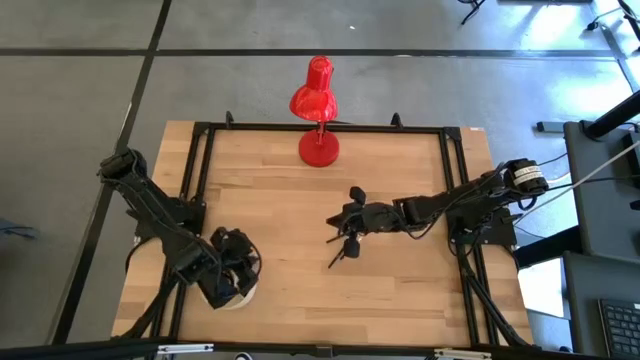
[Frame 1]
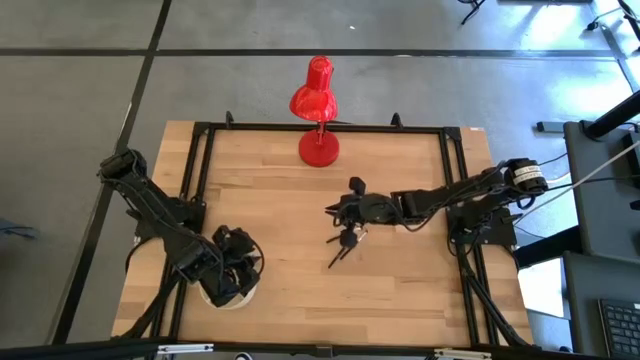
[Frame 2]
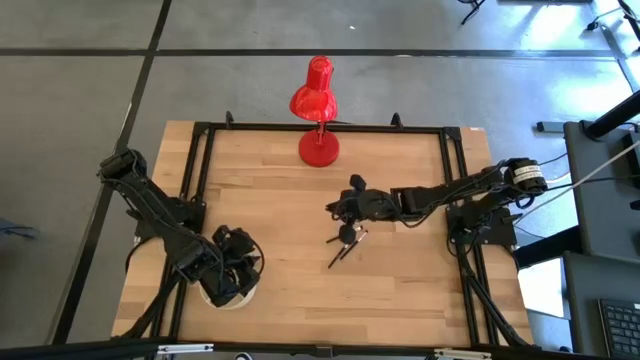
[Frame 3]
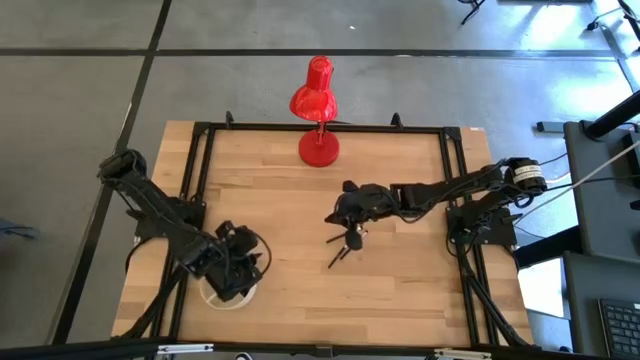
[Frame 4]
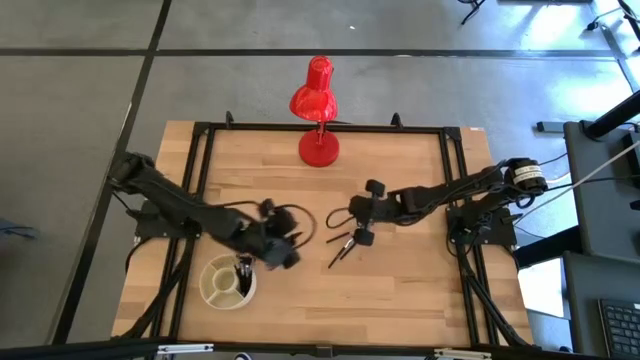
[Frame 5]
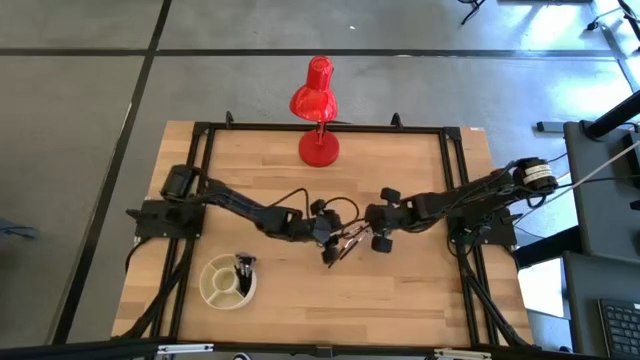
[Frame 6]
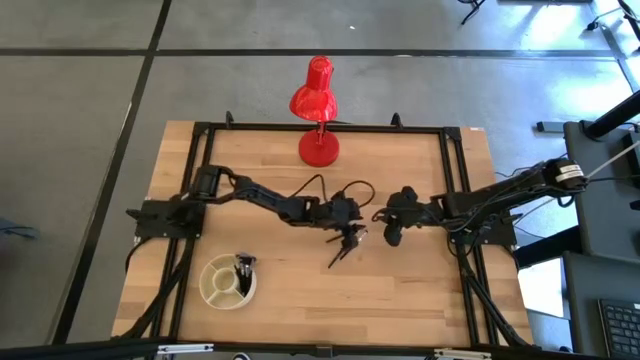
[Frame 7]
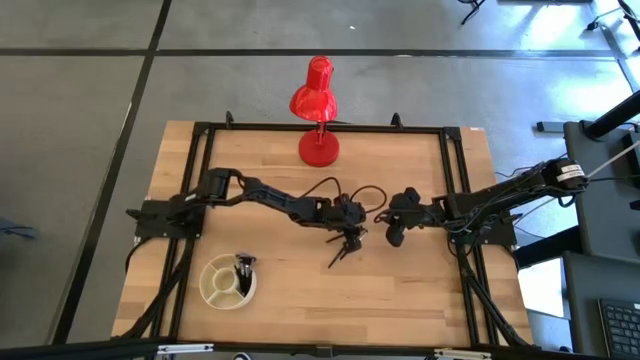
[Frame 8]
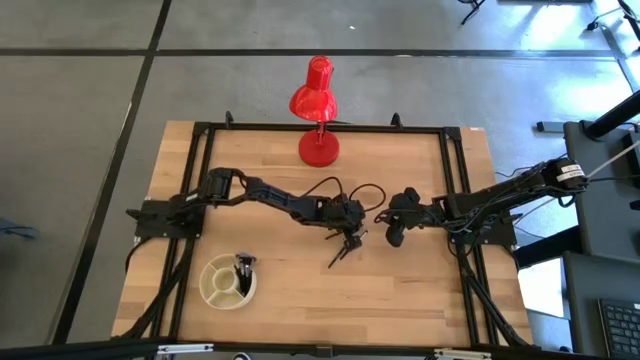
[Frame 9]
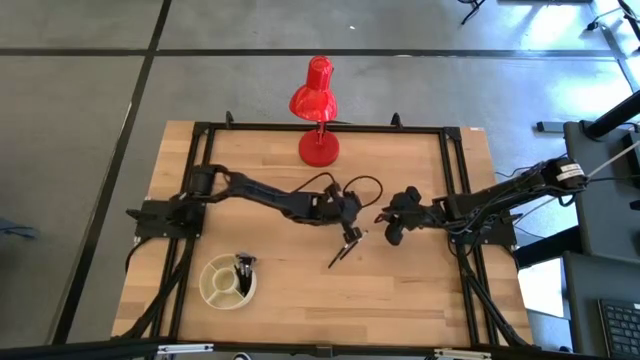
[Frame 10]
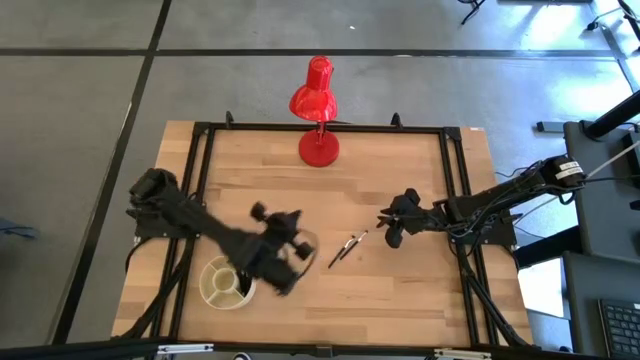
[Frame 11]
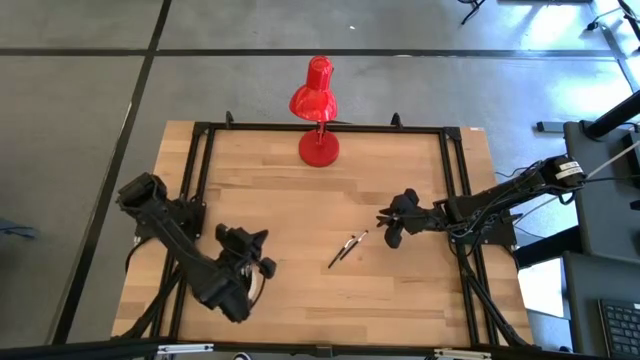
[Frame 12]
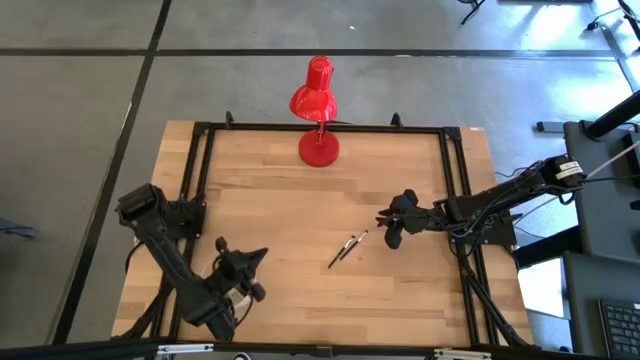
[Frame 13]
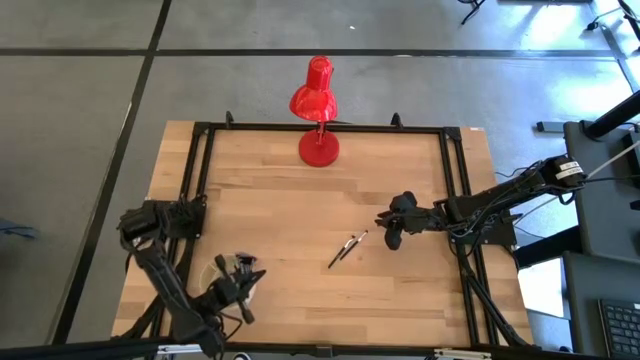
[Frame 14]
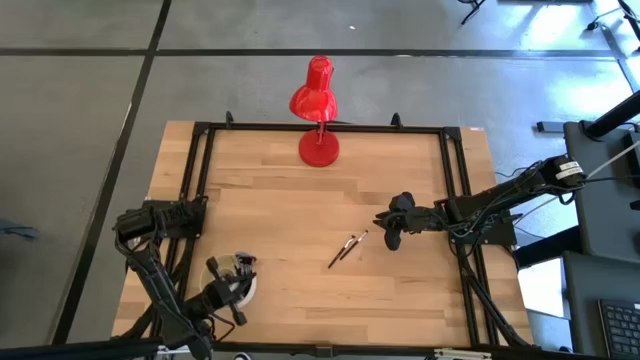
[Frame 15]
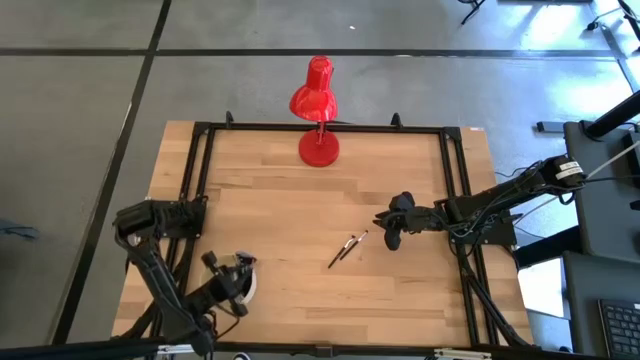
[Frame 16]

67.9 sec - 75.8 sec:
Task: Put items in baskets/containers
Put the eyeshadow brush into the pen organizer

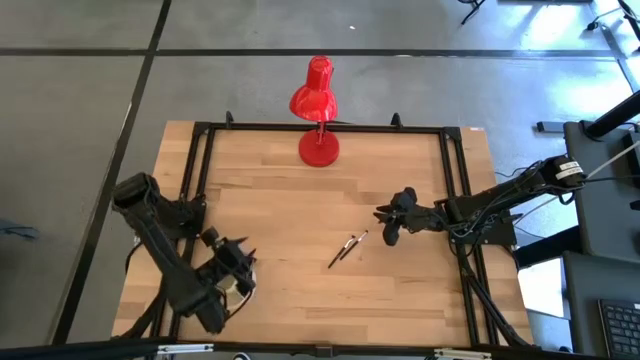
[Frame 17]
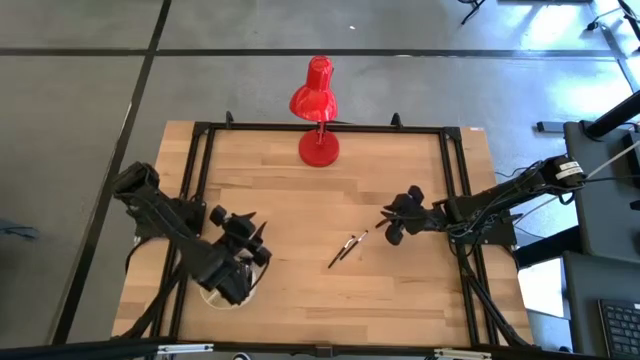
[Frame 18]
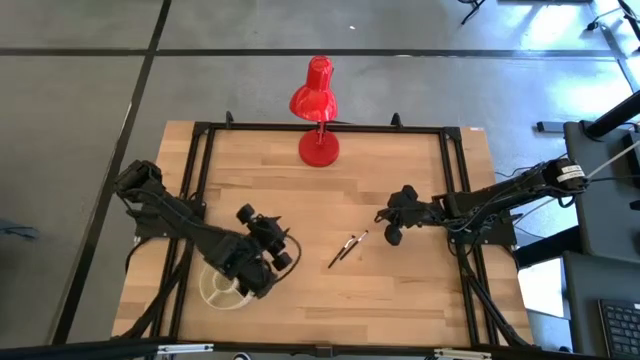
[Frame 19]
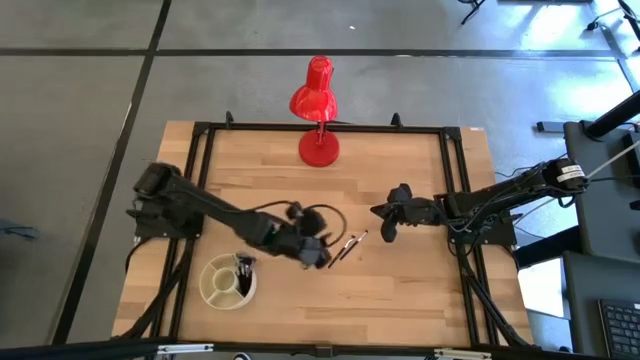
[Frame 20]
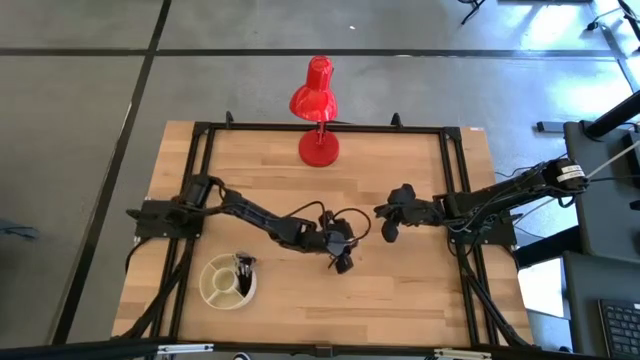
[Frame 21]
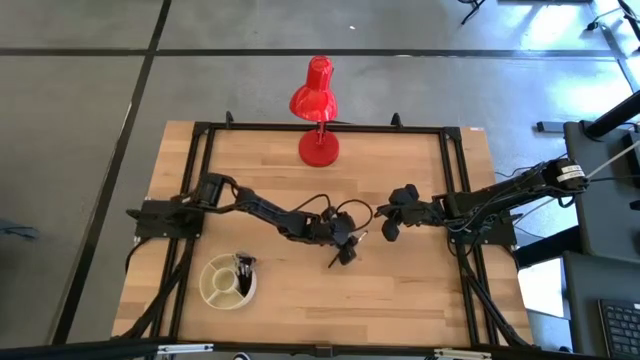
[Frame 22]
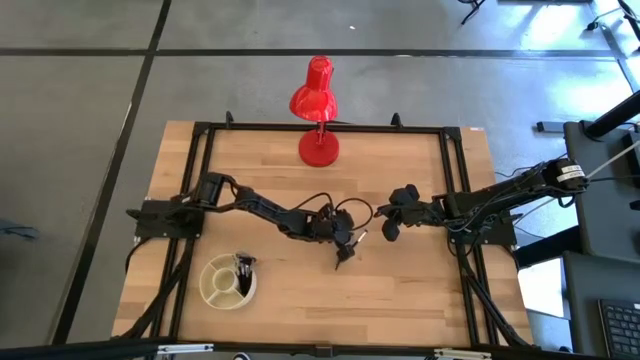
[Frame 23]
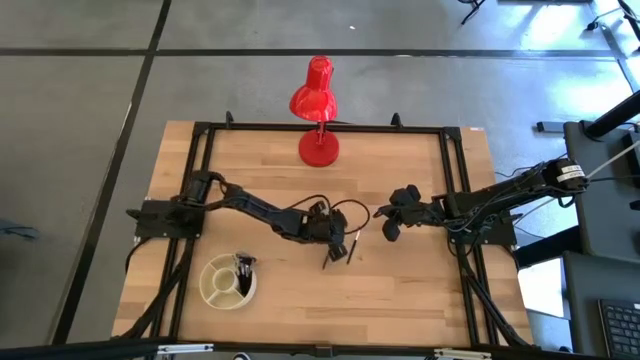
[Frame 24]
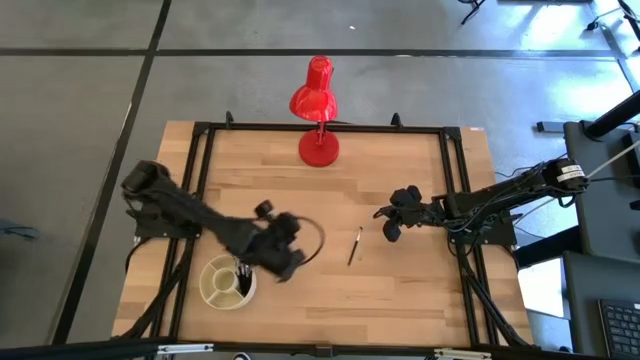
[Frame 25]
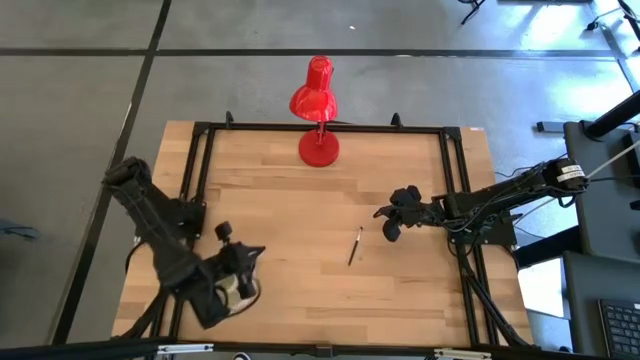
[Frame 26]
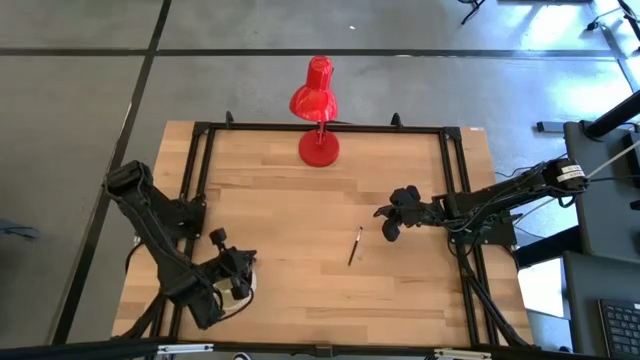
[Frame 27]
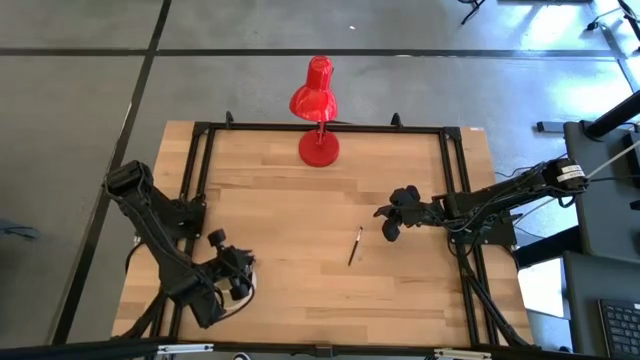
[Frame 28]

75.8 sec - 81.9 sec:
Put the eyeshadow brush into the pen organizer

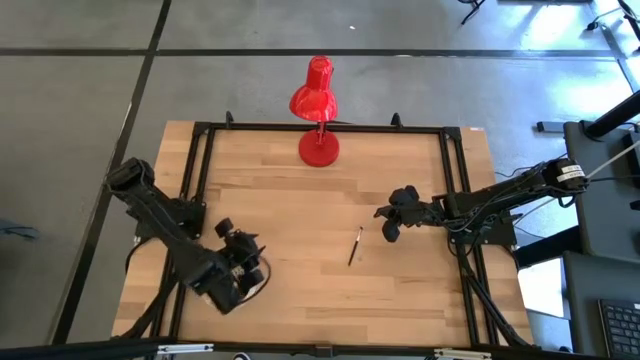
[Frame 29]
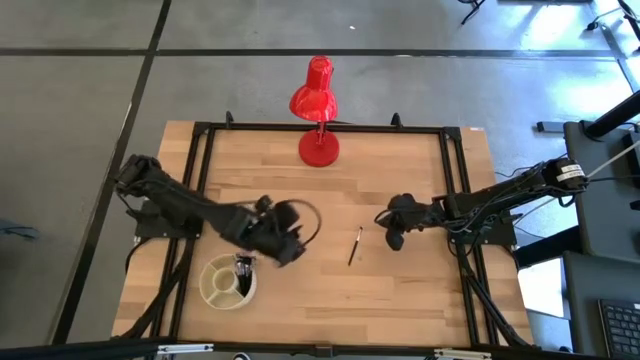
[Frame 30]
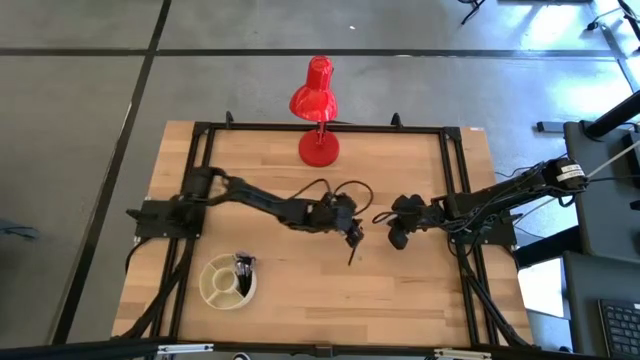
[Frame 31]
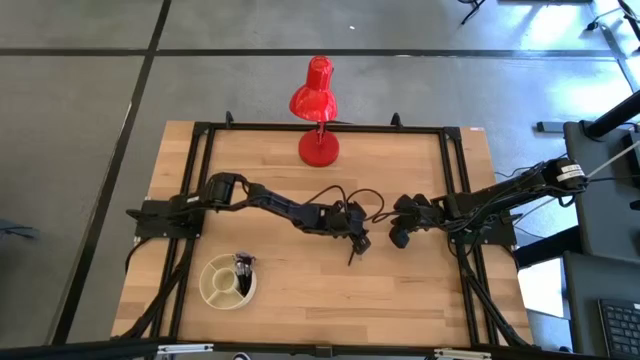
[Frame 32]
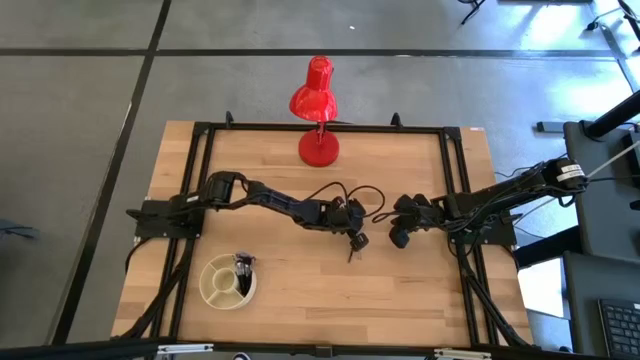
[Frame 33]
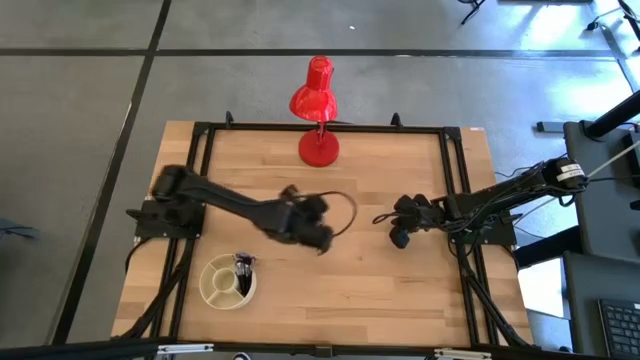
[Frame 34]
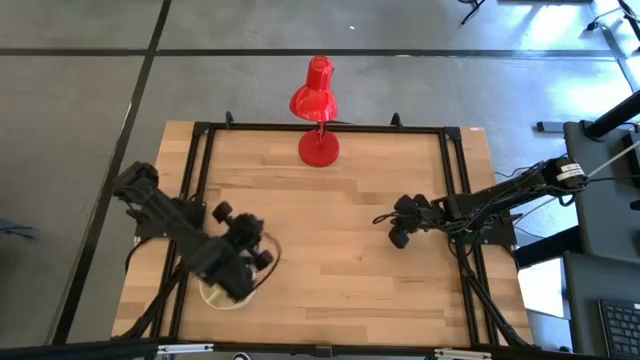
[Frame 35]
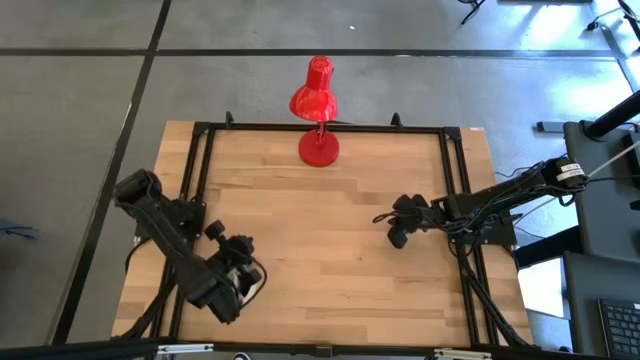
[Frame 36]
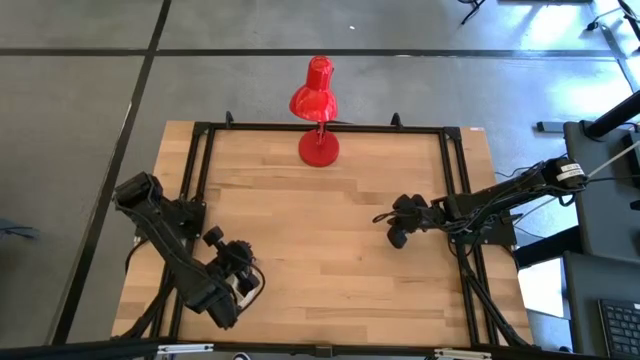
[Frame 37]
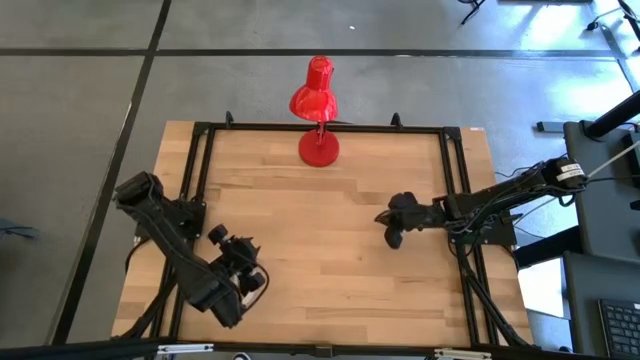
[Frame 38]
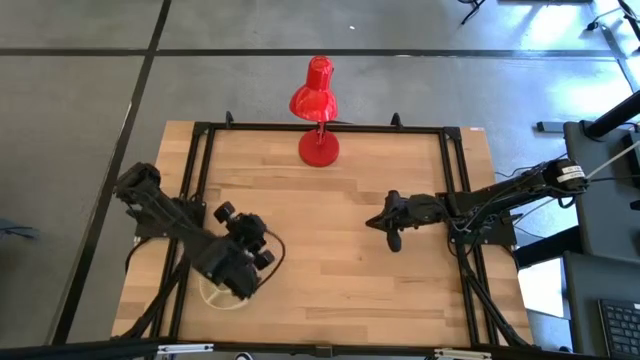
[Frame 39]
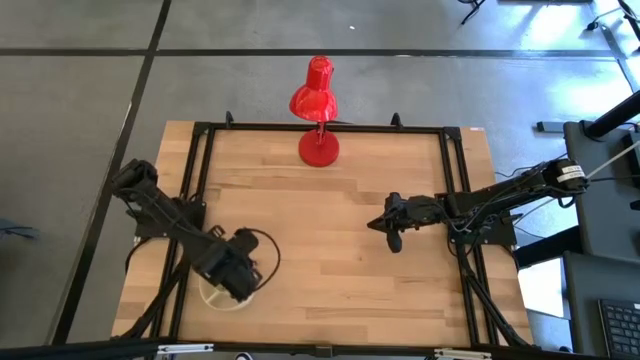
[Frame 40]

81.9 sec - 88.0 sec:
Put the eyeshadow brush into the pen organizer

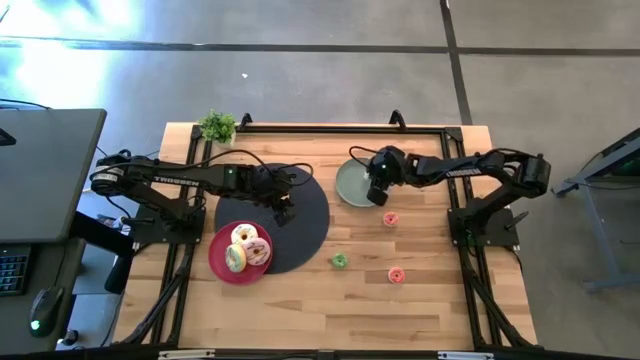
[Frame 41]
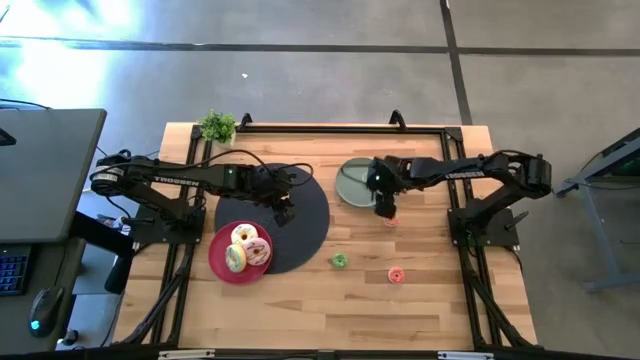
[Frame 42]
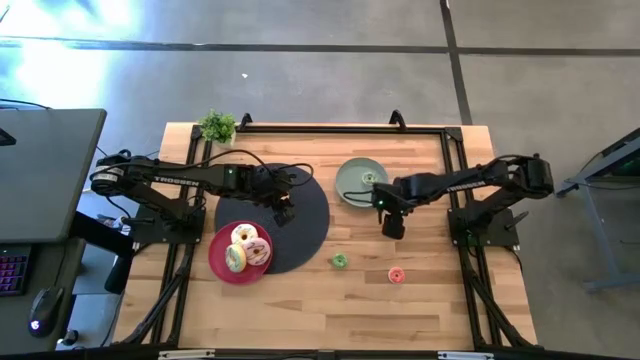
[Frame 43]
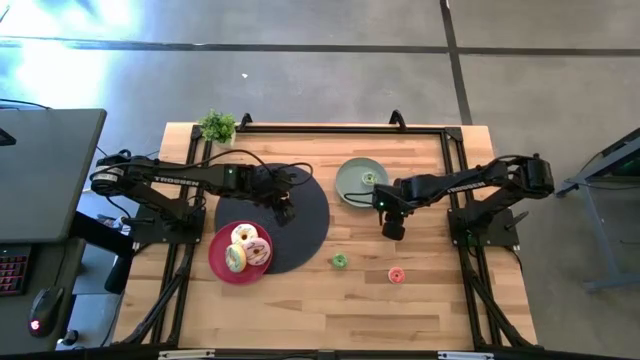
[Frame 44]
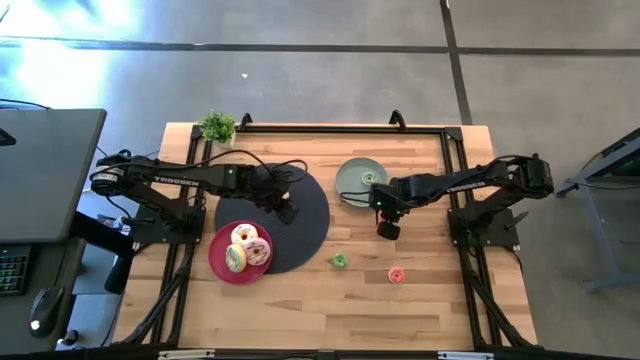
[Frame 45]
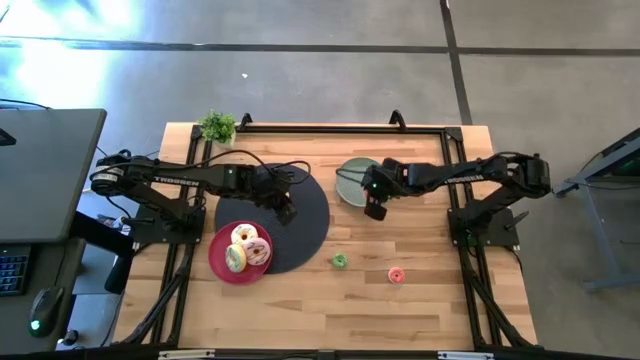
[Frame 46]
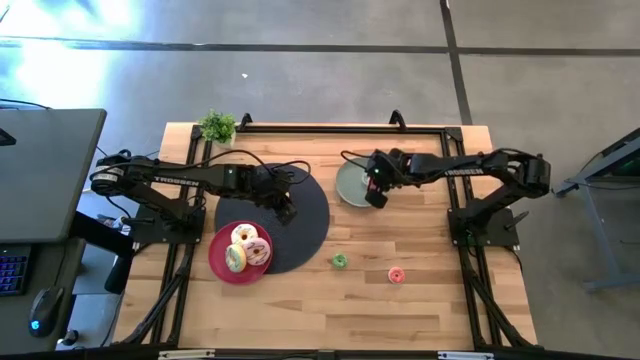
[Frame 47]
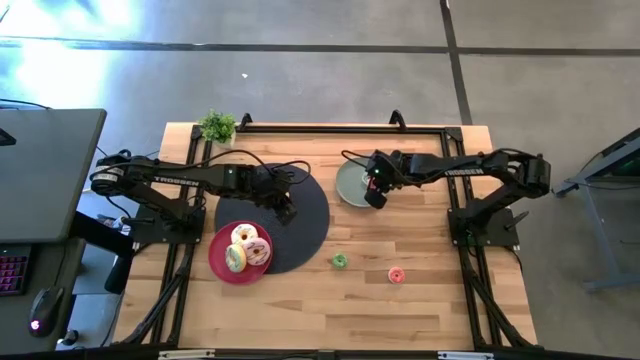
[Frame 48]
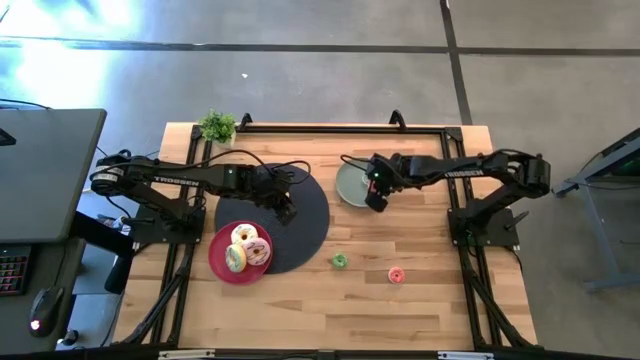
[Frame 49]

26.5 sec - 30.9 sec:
Task: Pick & Place donuts
Put the top small pink donut on the gray plate
